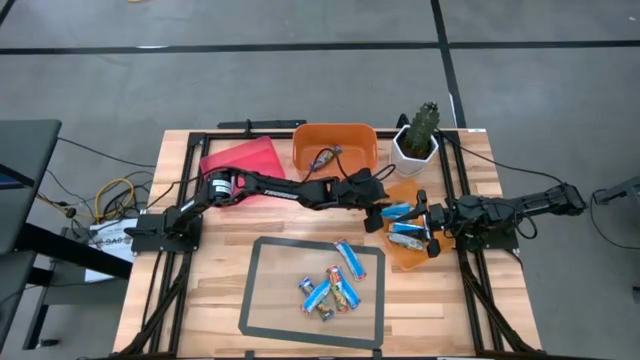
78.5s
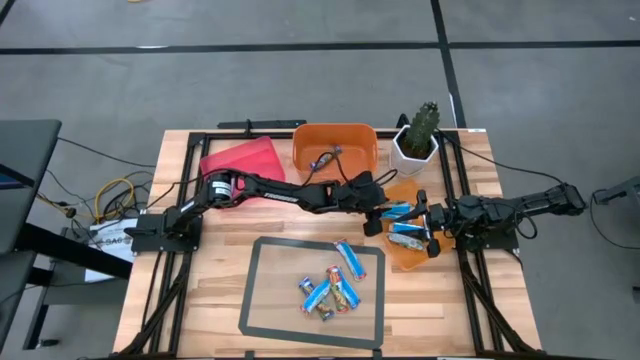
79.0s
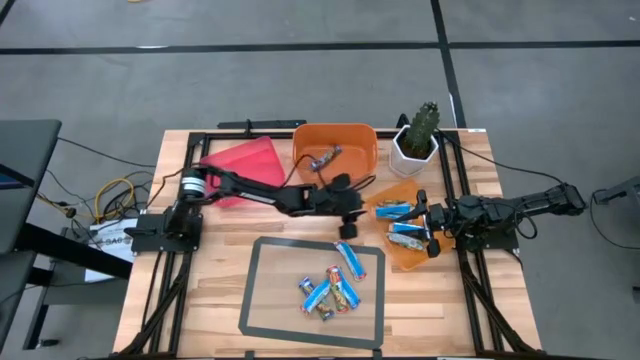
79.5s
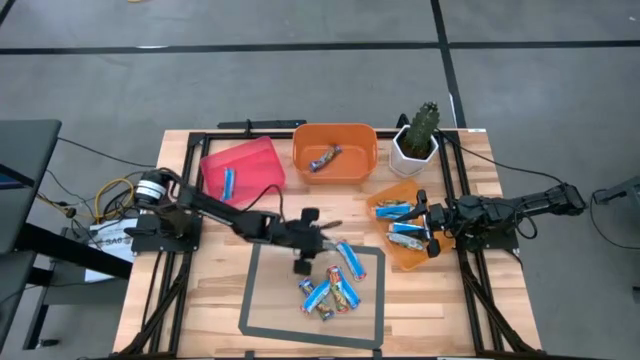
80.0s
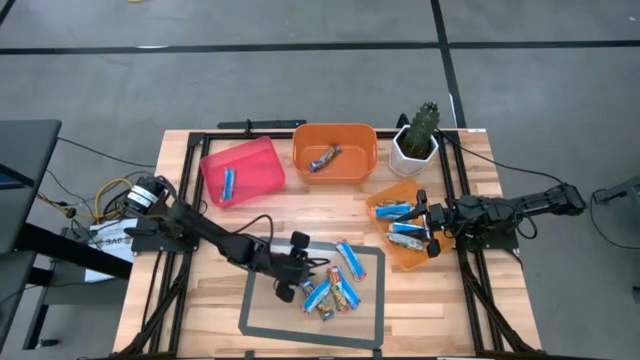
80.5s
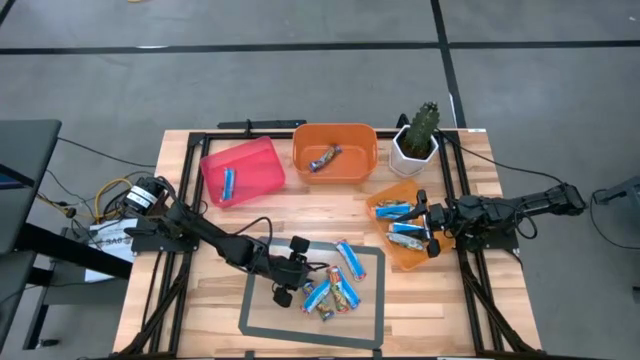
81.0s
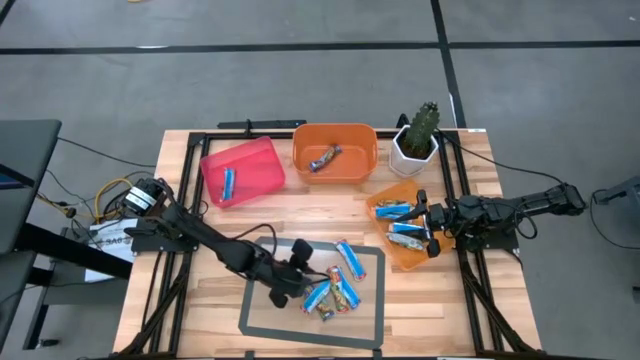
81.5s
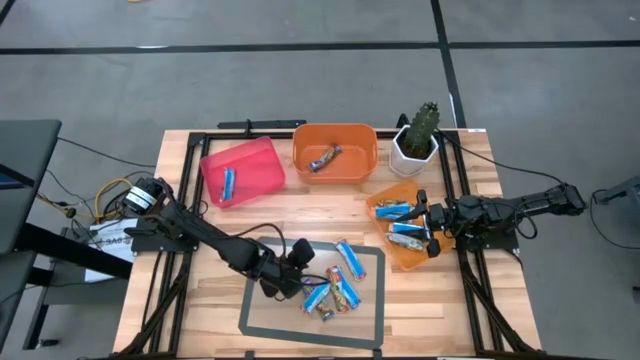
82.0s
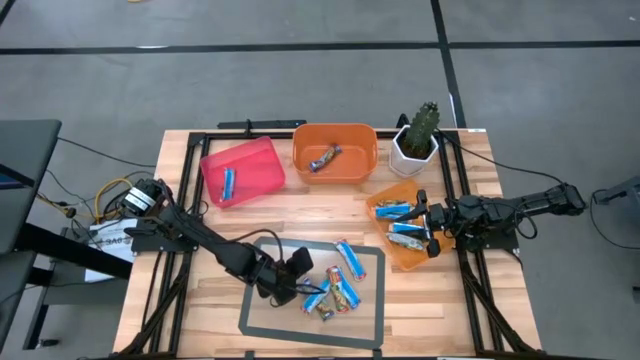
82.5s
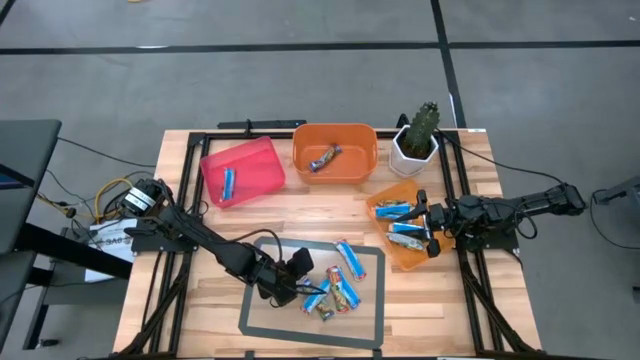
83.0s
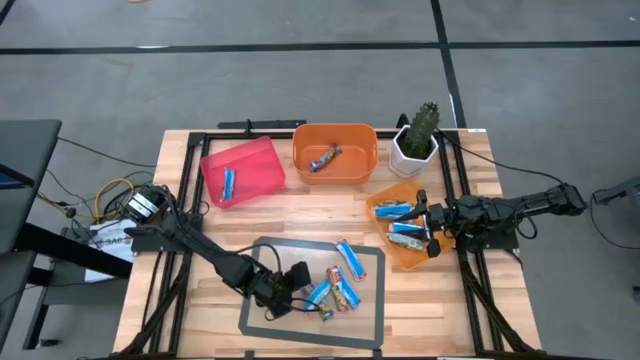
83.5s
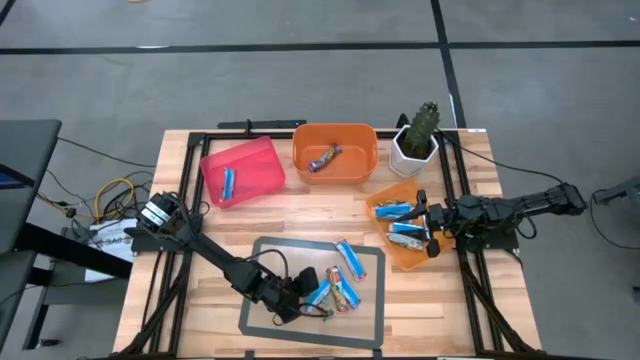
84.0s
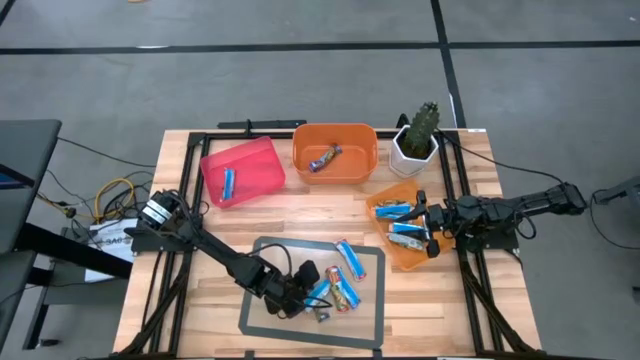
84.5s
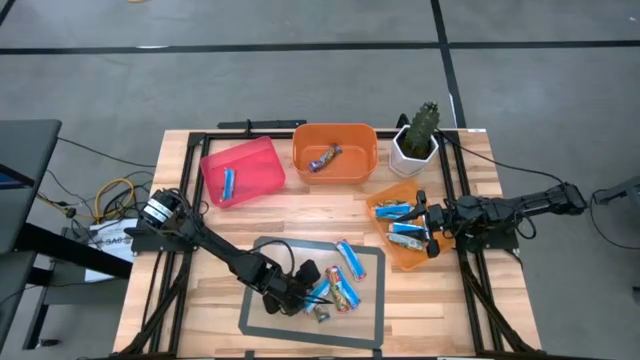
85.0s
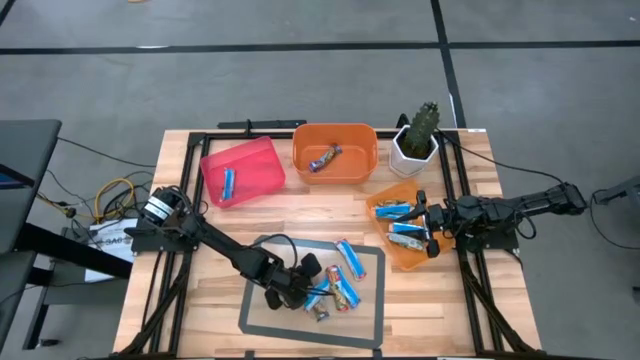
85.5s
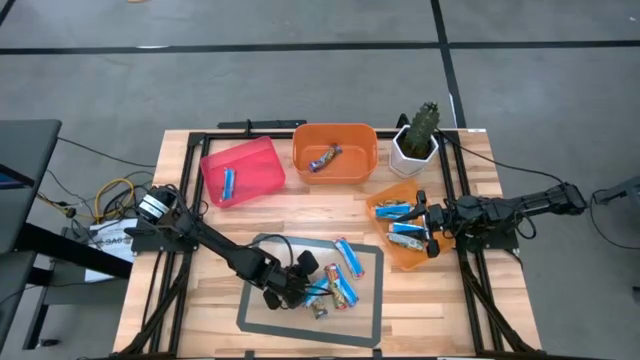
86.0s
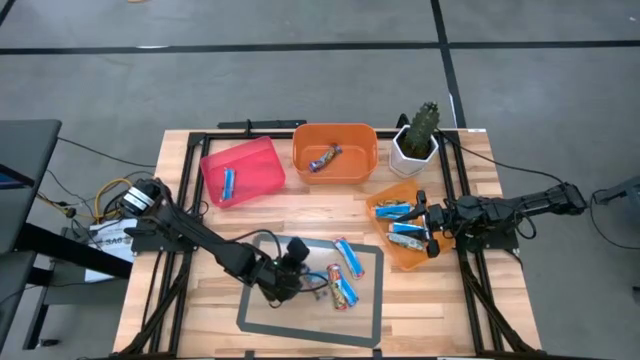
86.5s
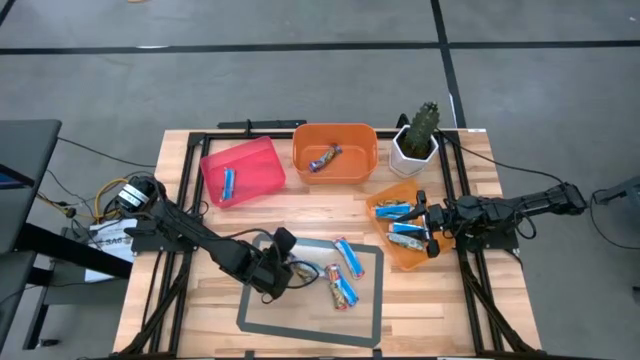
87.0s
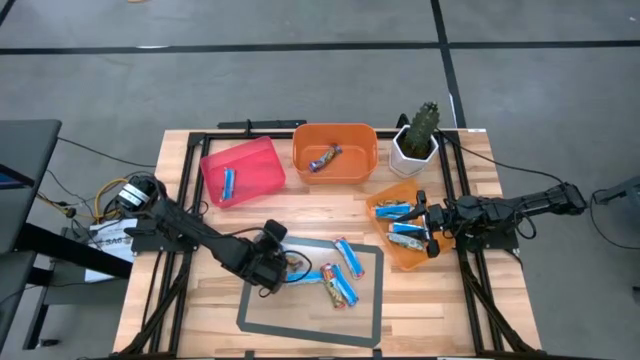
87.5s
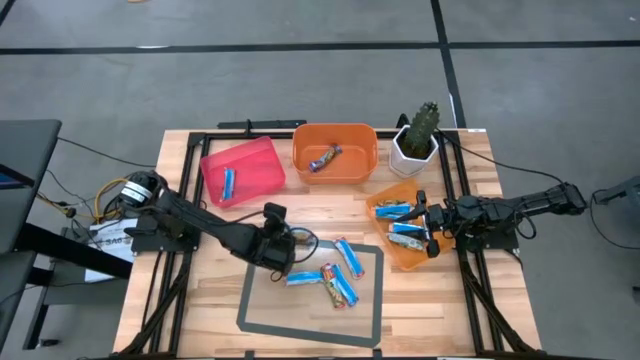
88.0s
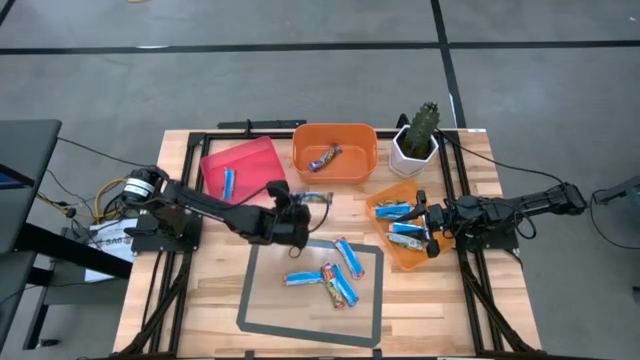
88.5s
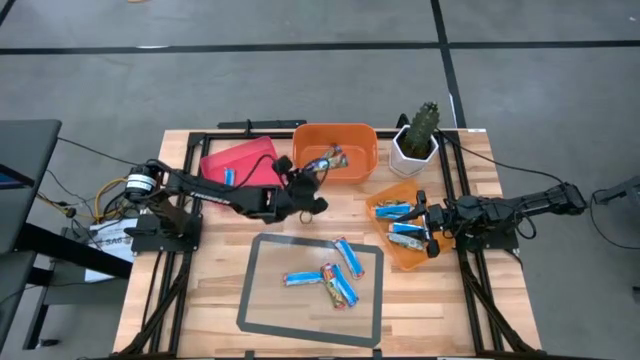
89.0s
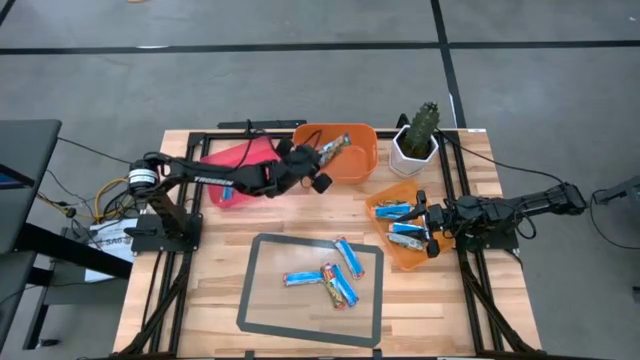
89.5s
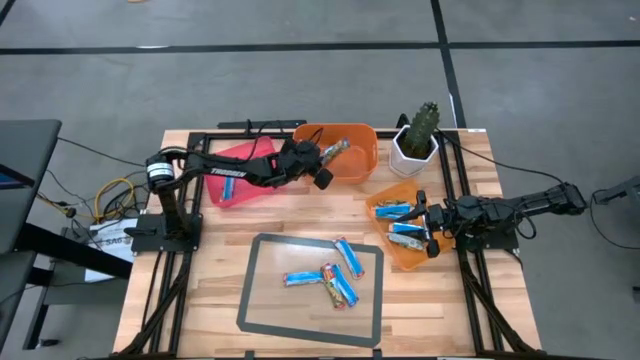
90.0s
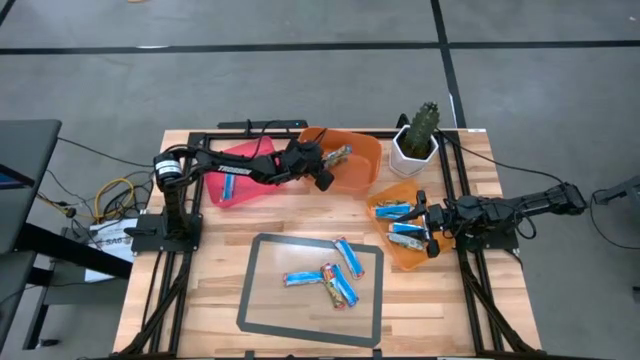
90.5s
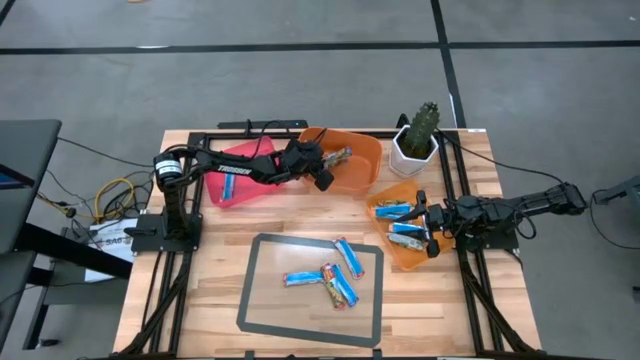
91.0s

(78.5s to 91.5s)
Task: Pick and place Granola Bars by type
Put the blue granola bar into the orange bin

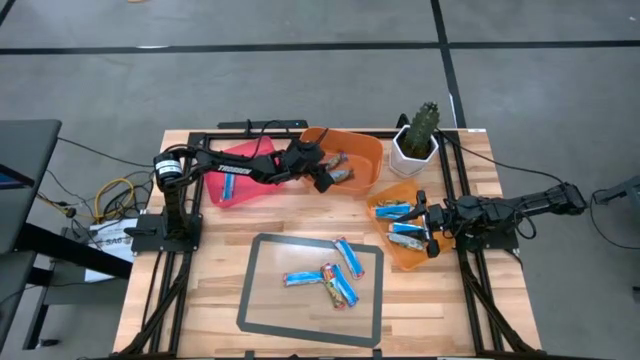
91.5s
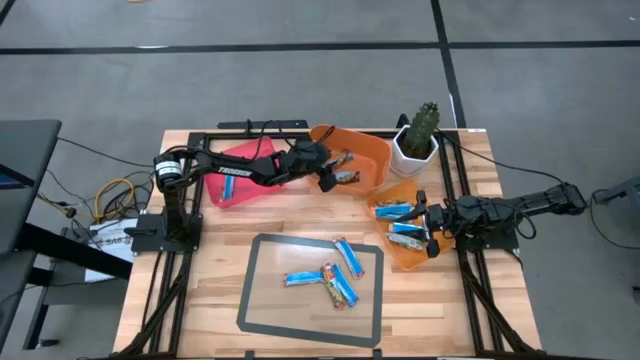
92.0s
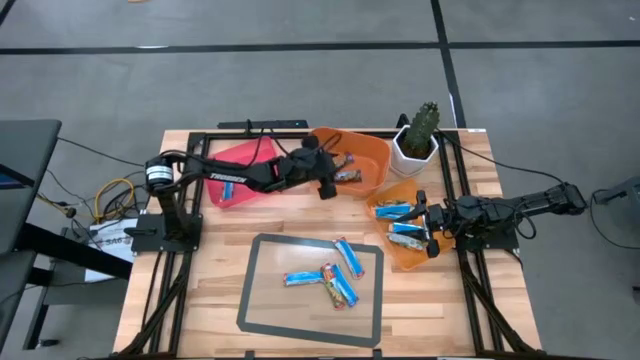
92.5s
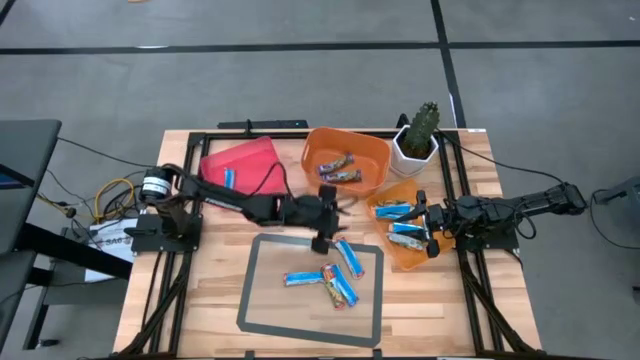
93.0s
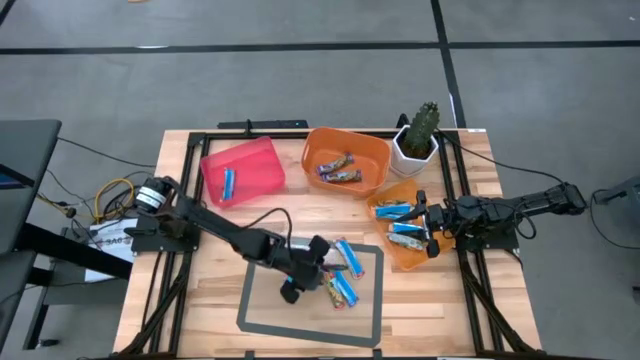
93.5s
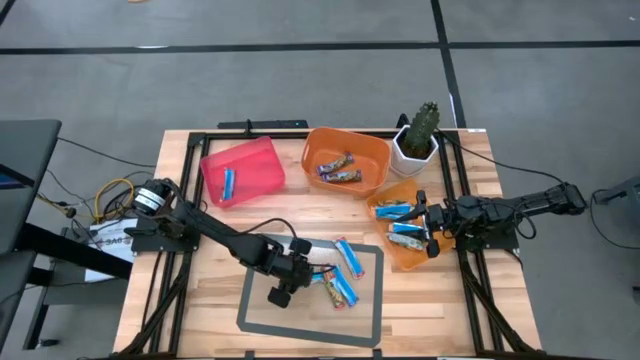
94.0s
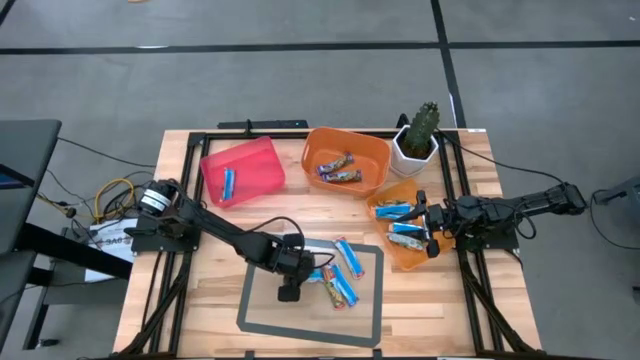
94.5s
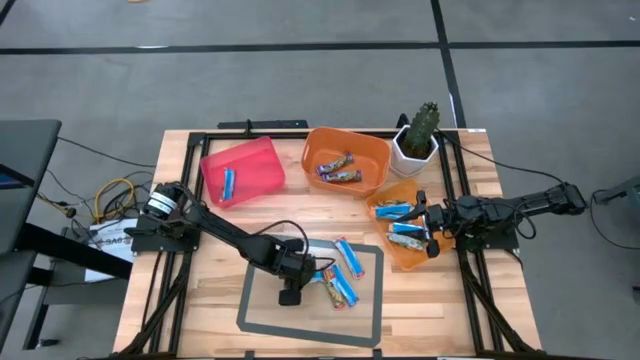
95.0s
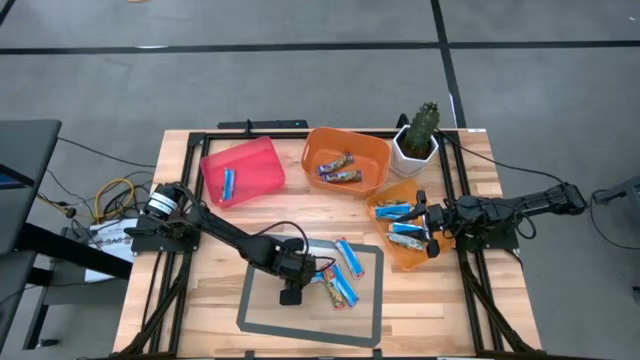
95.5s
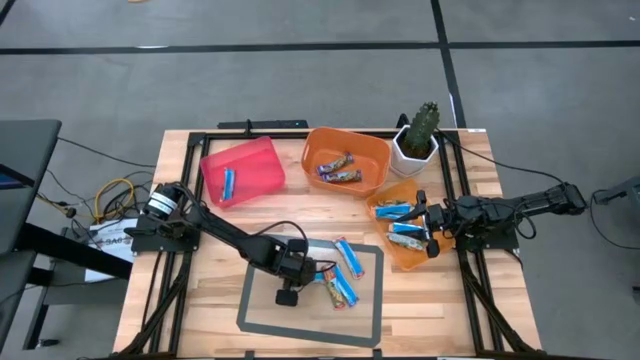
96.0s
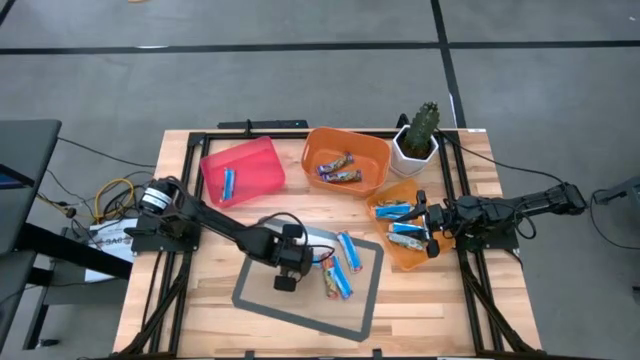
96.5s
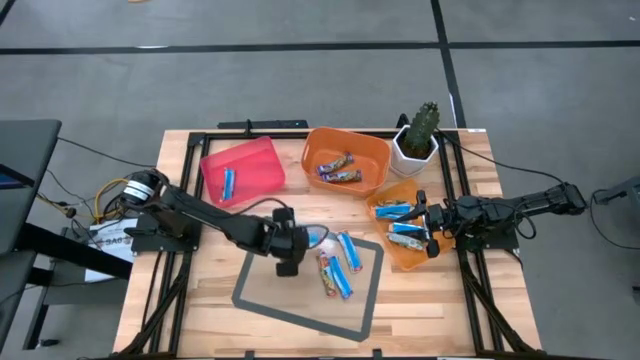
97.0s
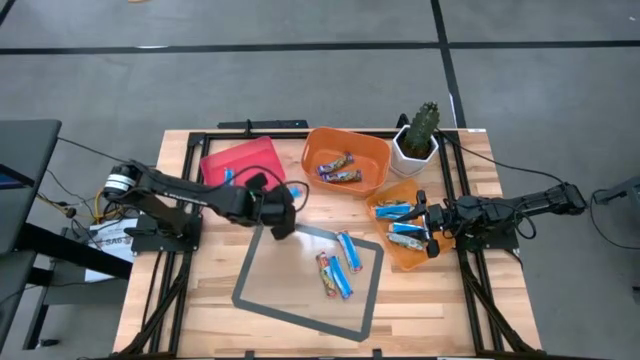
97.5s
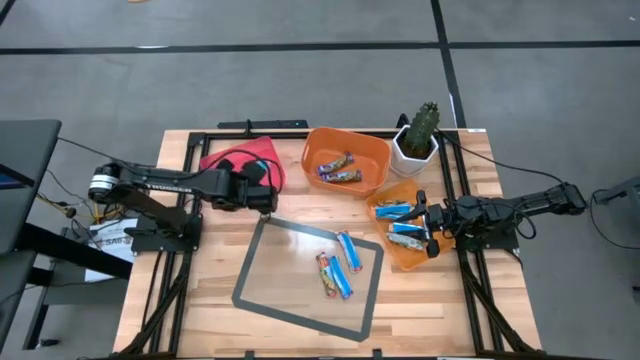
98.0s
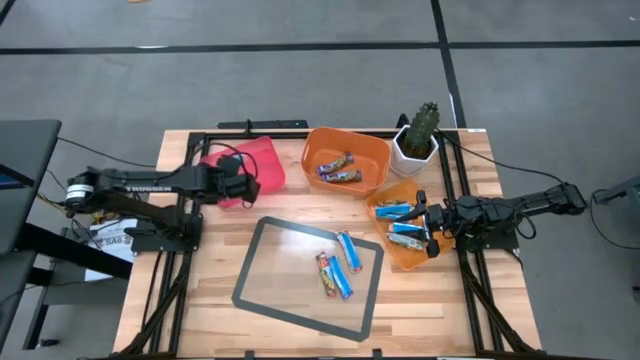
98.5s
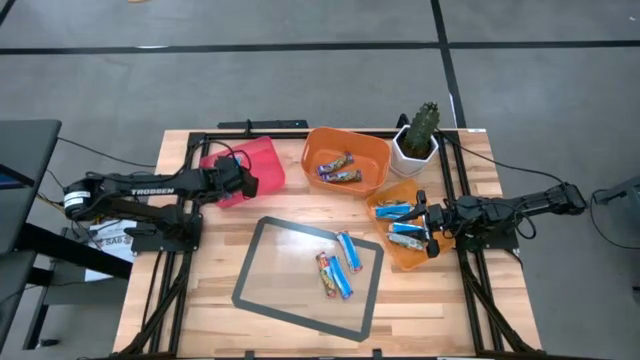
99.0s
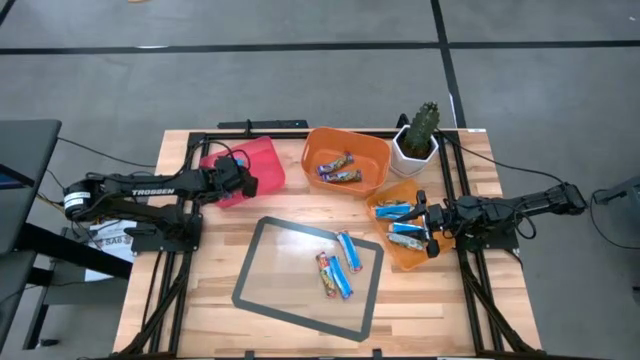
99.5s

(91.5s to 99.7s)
Put the red granola bar into the red bin
